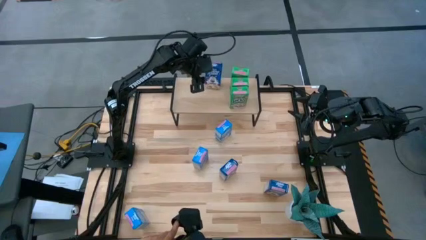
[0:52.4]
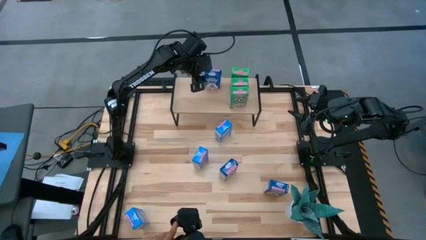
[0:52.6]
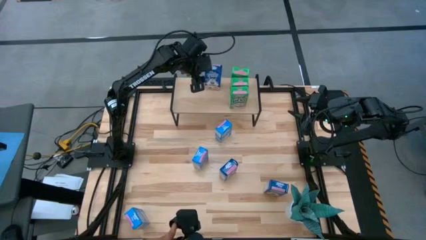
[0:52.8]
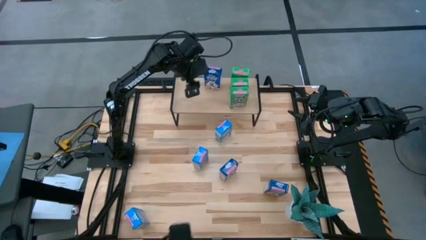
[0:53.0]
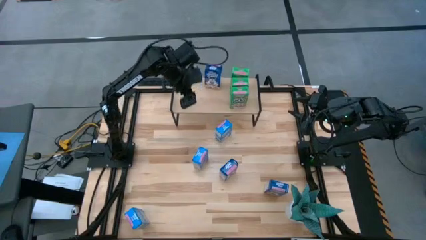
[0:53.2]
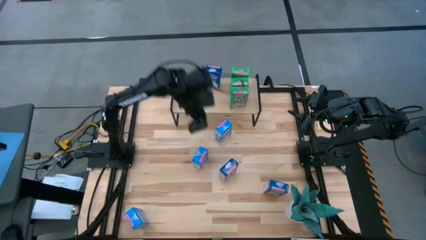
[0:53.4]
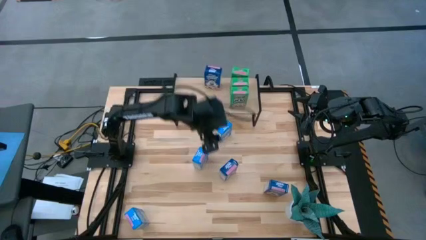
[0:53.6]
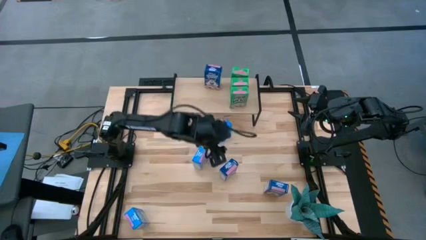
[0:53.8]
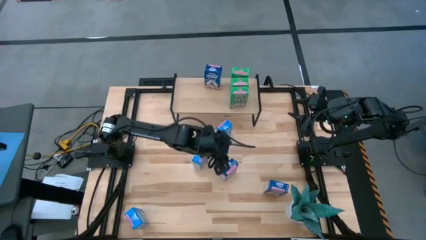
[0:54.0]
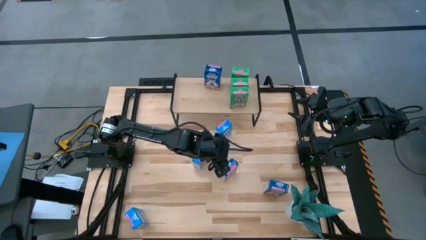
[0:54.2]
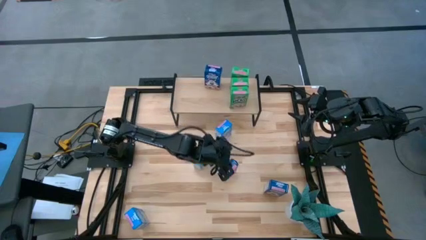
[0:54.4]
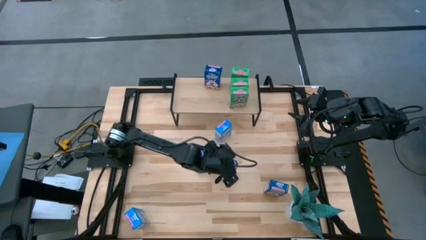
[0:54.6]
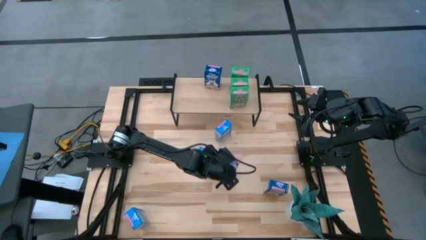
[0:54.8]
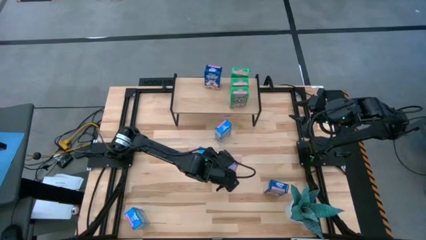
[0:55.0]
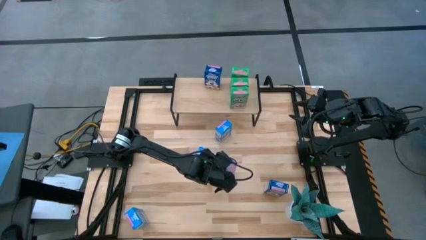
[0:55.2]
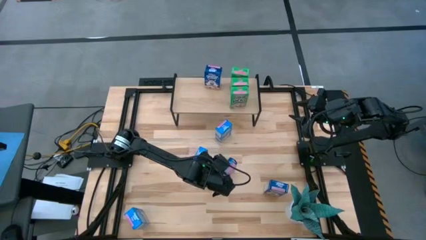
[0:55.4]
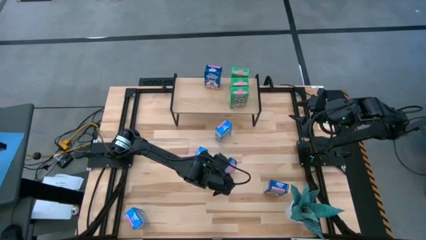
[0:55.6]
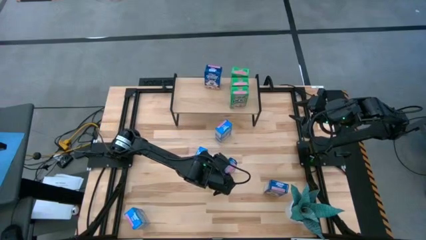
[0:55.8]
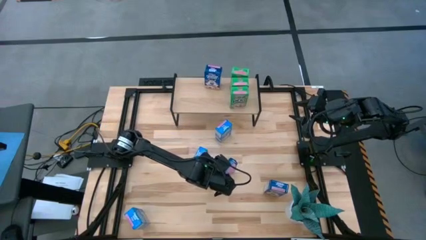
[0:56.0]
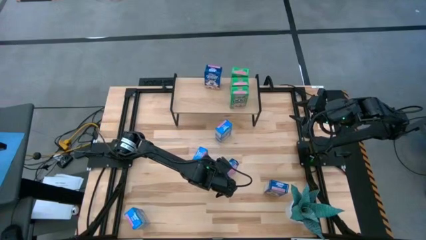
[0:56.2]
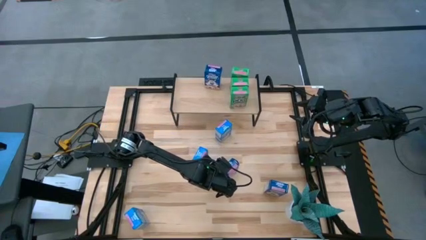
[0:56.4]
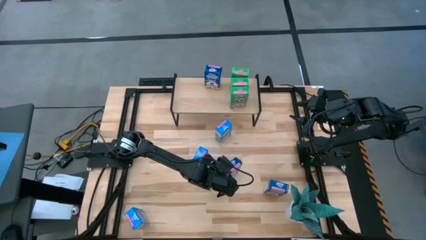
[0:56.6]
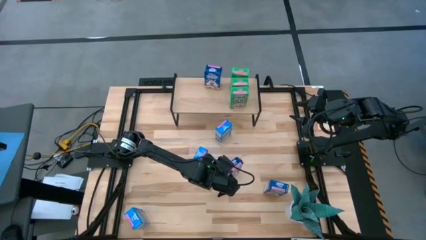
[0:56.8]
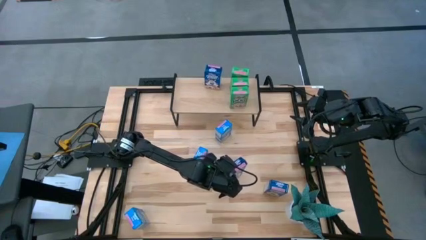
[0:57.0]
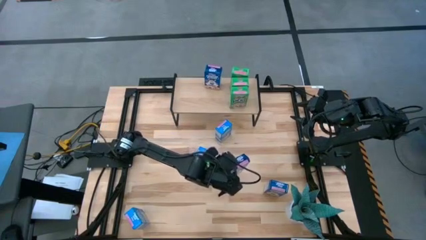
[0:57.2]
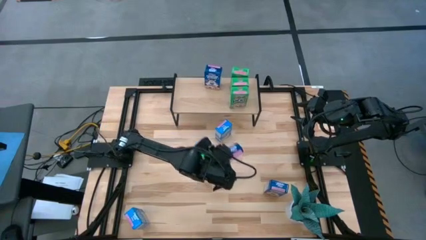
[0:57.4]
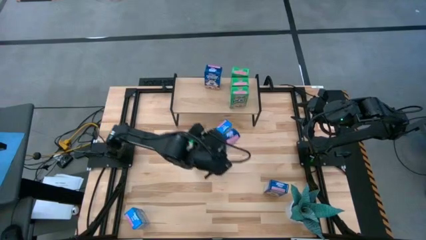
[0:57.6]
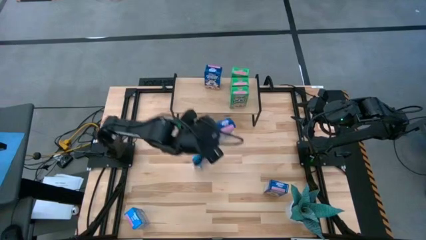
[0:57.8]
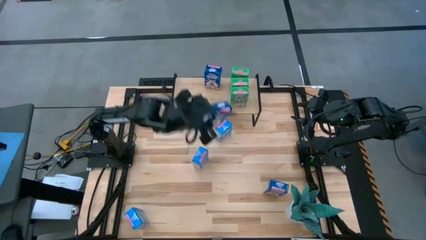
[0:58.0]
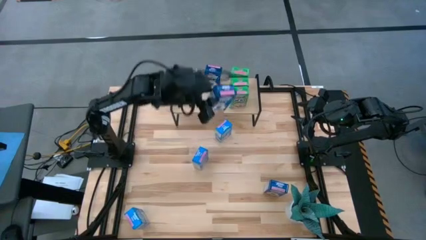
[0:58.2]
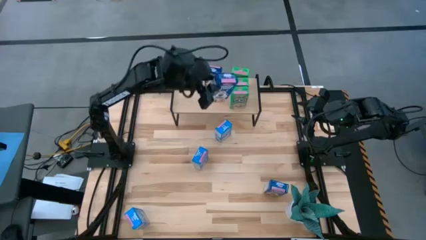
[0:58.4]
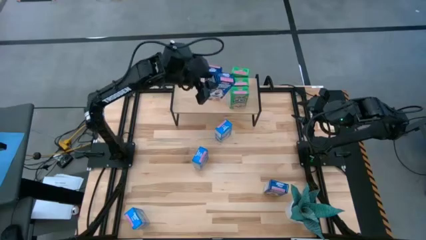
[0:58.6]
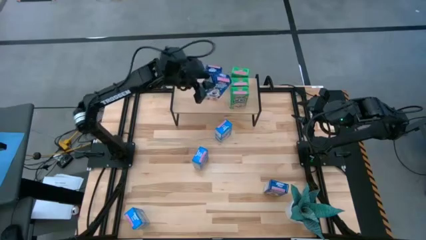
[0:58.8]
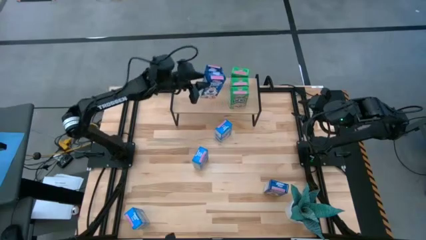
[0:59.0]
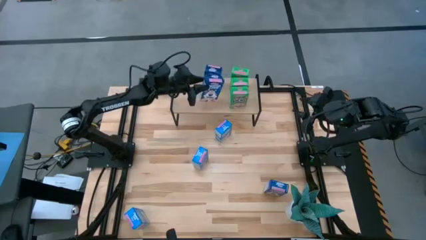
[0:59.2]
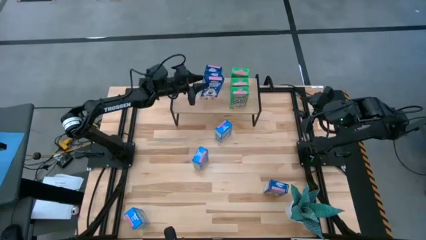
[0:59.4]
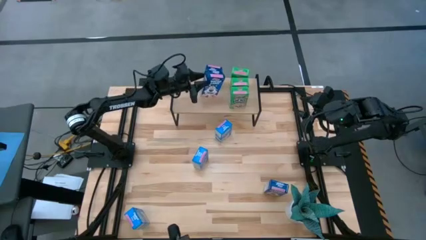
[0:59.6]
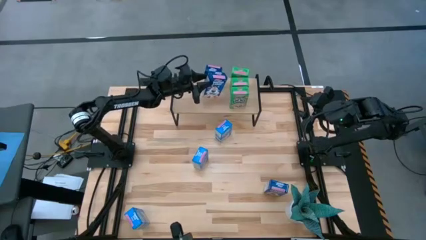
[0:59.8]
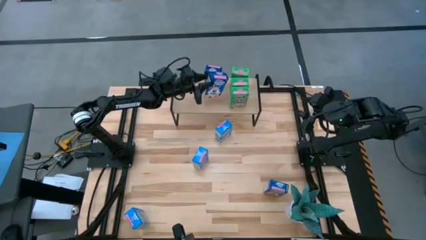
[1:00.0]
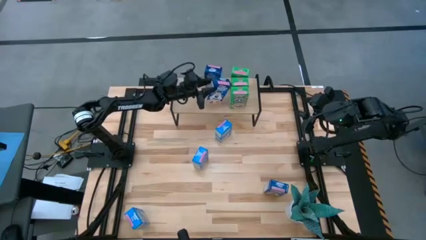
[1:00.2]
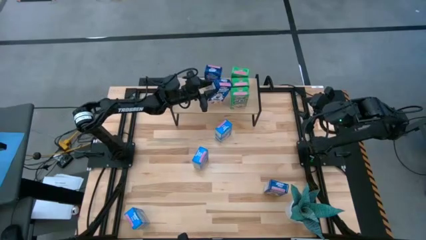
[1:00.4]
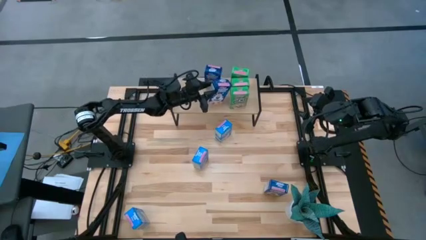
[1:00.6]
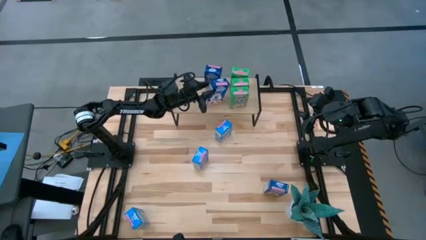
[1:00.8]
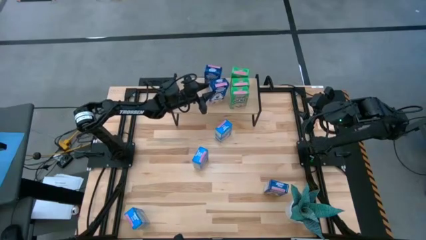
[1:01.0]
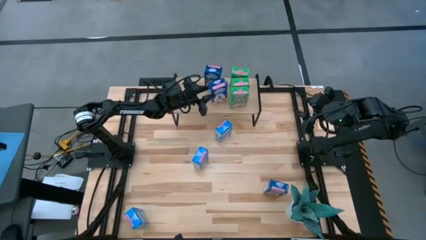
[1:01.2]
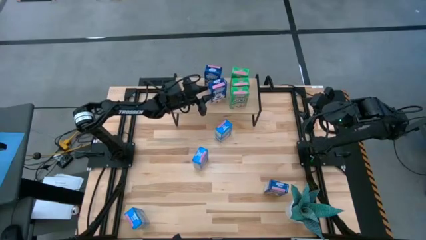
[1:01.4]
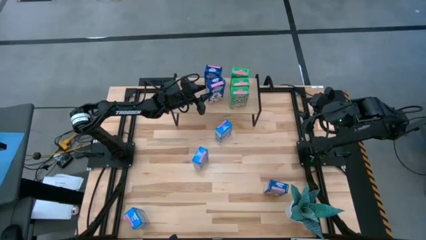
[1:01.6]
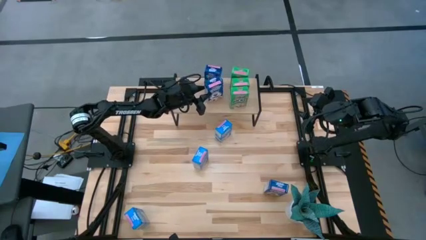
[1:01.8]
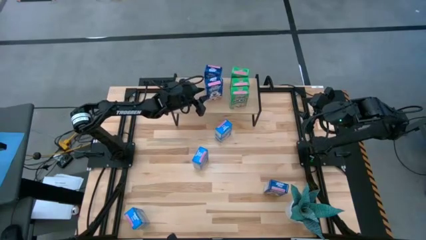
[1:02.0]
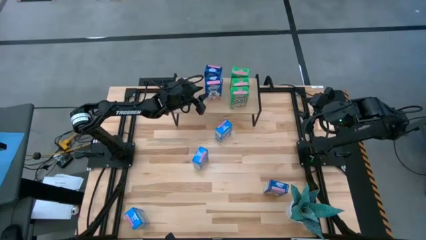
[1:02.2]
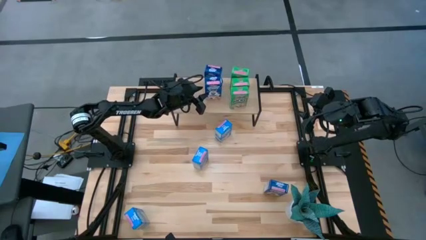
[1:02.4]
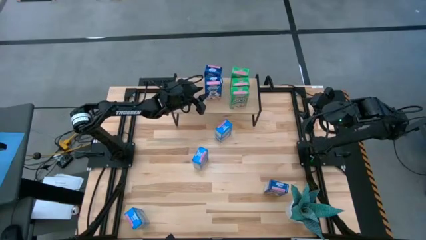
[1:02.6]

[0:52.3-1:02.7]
Task: Stack cereal on shelf
Put the top blue cereal box aligned with the other blue cereal box on the shelf

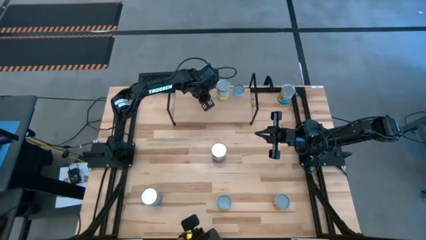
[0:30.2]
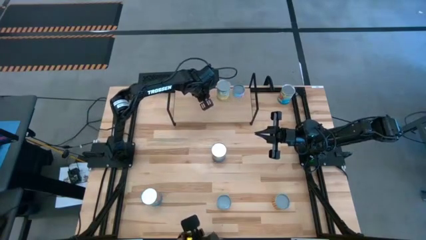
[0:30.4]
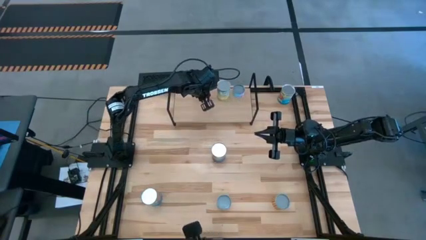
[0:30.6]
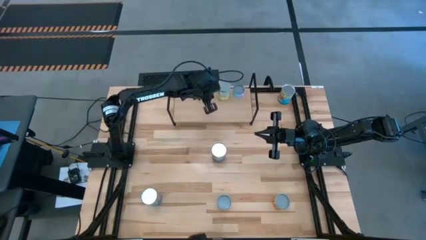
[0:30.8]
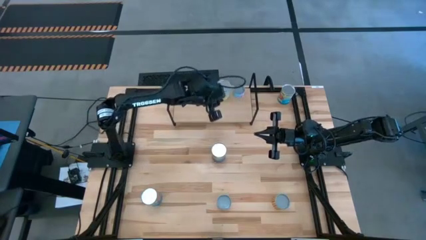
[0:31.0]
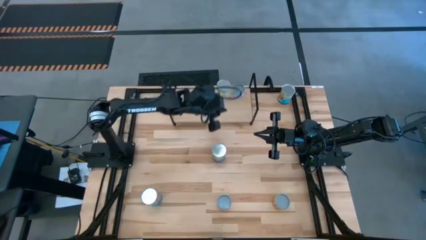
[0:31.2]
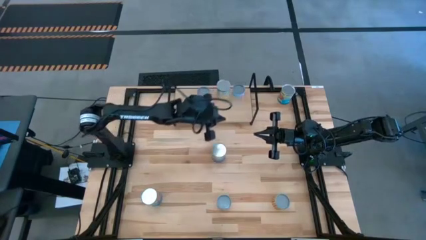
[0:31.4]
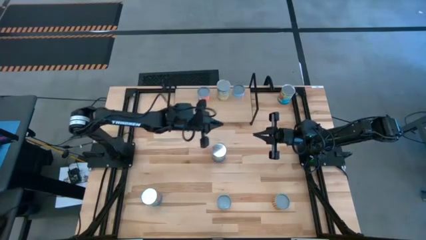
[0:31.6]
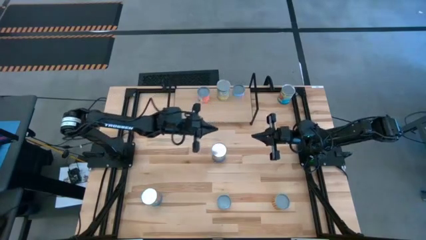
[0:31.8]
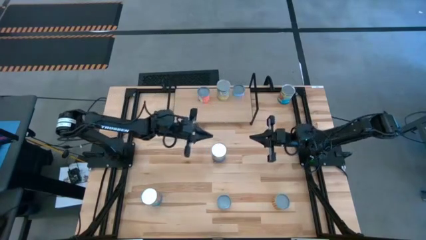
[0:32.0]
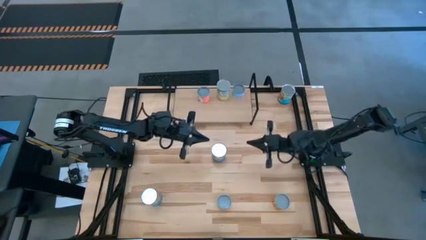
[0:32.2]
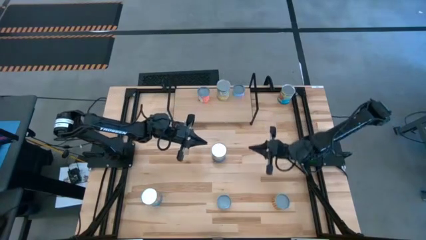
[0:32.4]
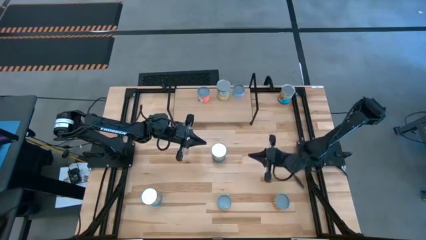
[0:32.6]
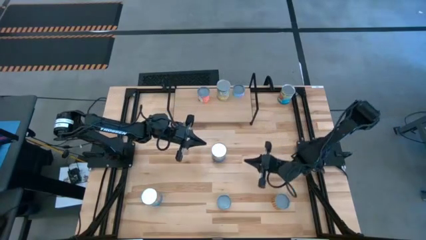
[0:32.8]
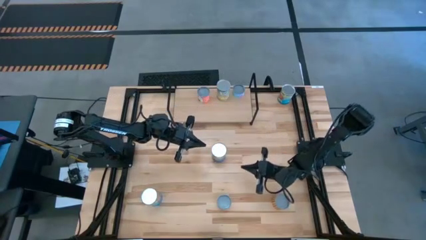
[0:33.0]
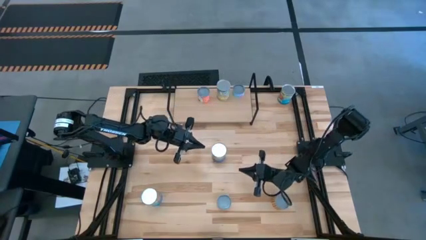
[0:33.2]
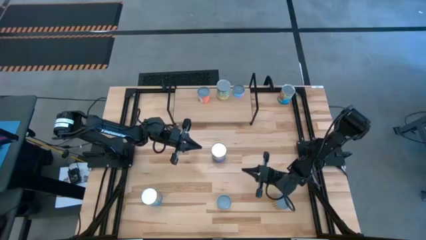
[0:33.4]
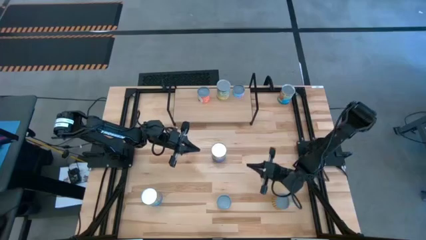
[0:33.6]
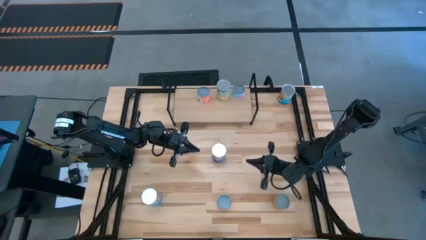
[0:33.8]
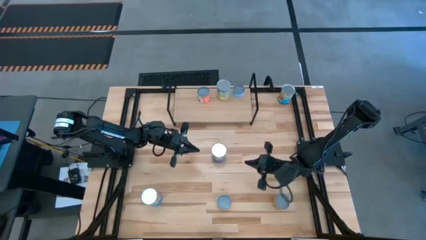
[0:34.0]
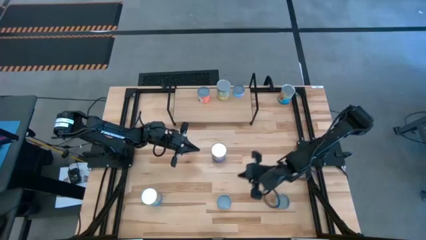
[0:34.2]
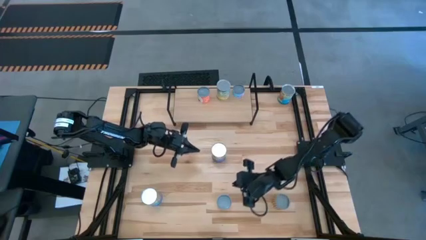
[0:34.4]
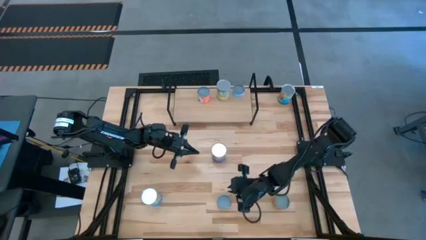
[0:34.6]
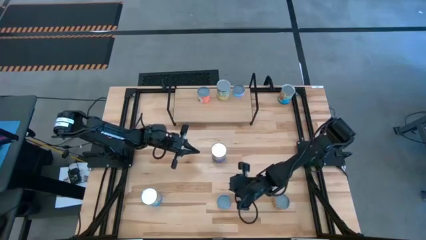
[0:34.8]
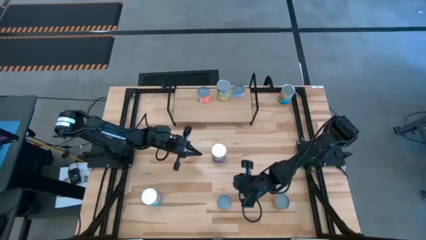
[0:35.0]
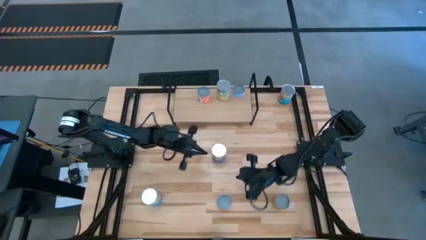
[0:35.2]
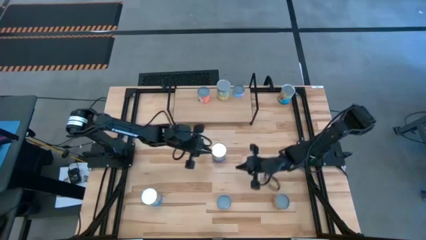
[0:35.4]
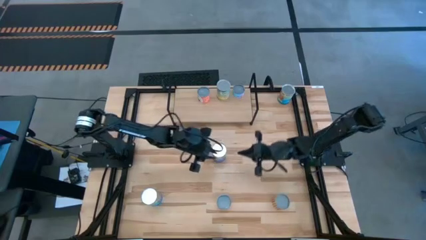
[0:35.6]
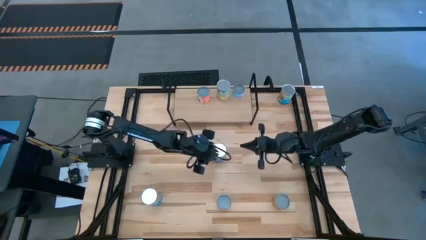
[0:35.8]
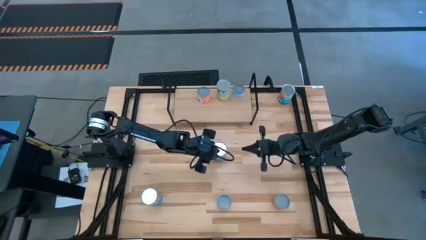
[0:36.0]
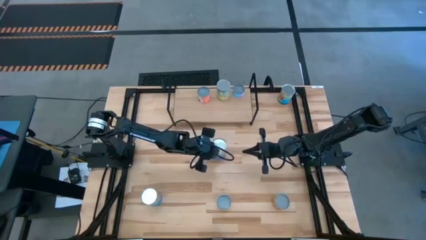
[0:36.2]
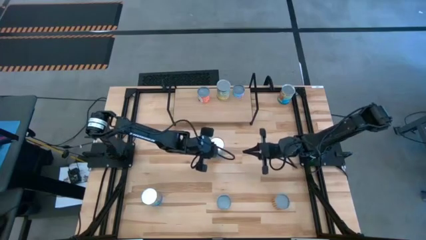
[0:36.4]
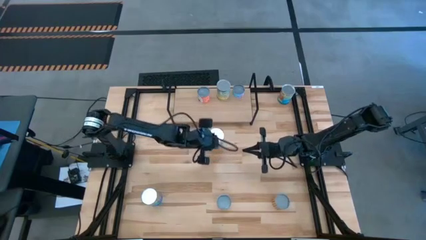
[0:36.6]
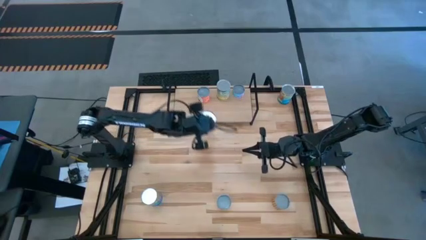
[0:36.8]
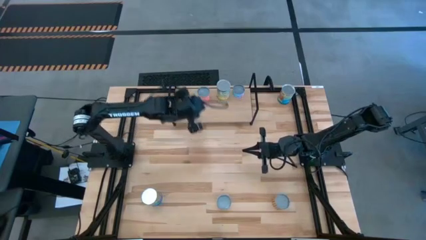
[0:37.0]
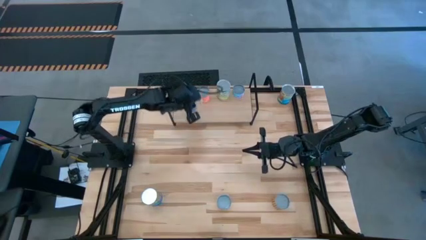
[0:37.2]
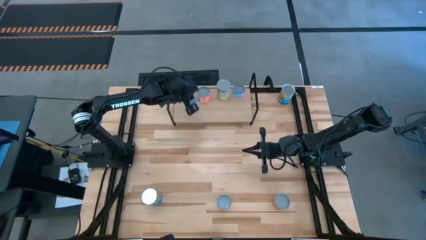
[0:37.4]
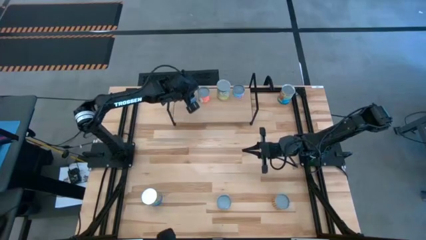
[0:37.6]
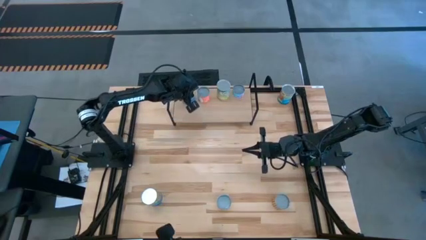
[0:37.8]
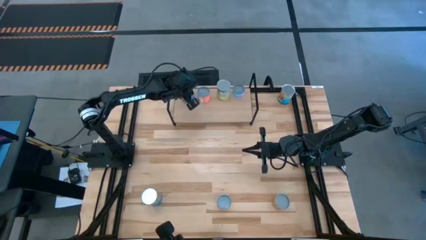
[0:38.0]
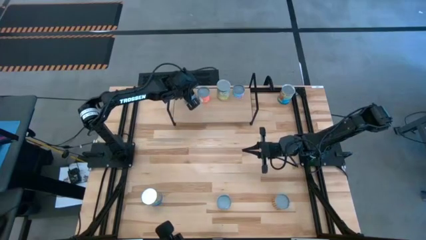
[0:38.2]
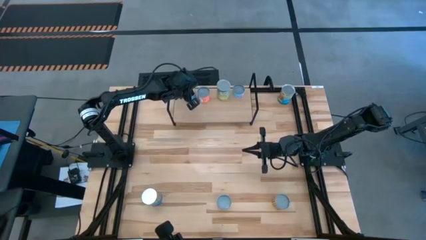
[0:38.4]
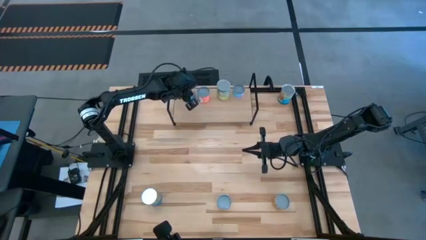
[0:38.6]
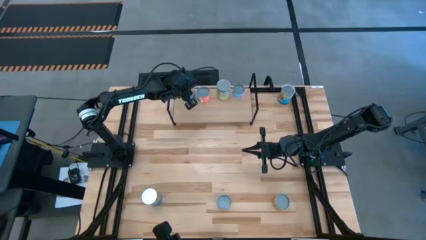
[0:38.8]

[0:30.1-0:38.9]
Task: Pick and place cans onto a shelf
Put the canned peas on the shelf
